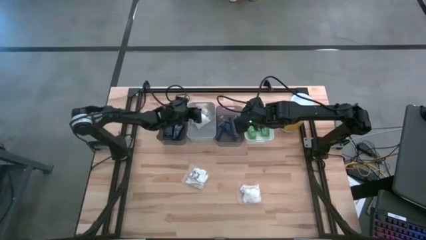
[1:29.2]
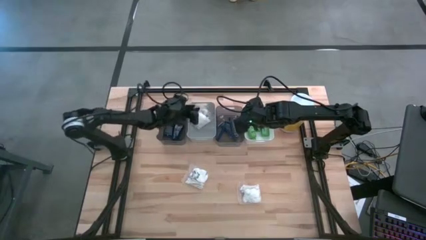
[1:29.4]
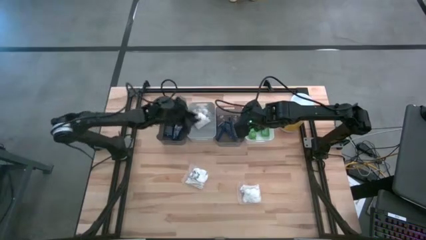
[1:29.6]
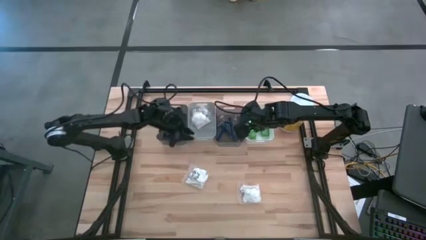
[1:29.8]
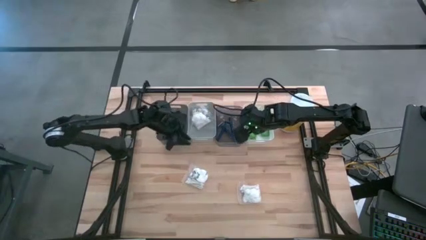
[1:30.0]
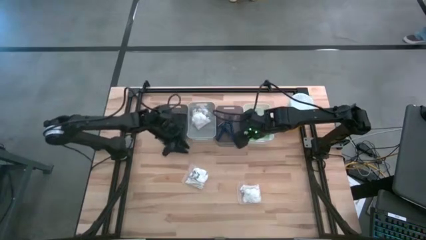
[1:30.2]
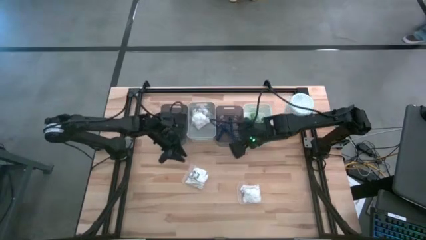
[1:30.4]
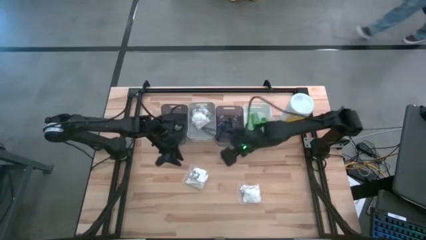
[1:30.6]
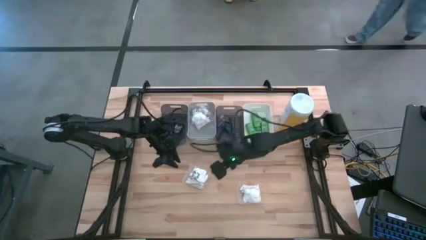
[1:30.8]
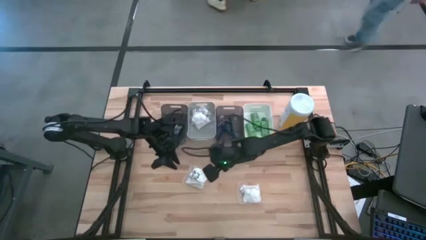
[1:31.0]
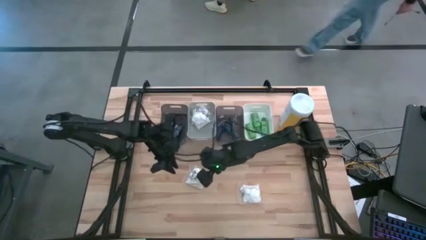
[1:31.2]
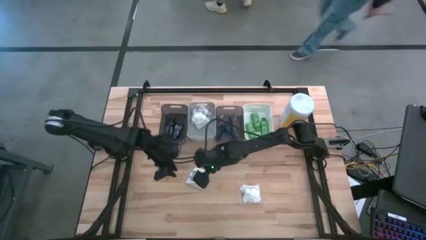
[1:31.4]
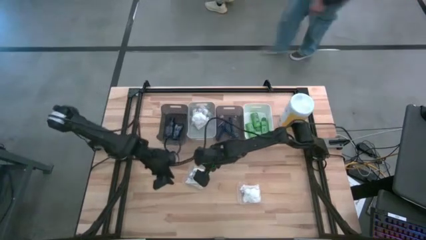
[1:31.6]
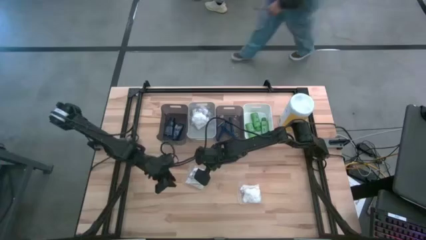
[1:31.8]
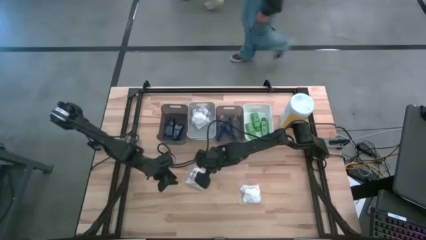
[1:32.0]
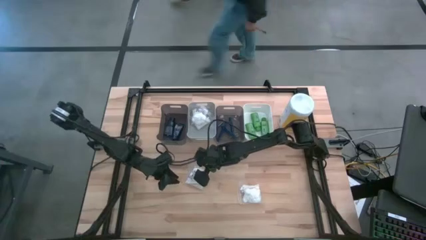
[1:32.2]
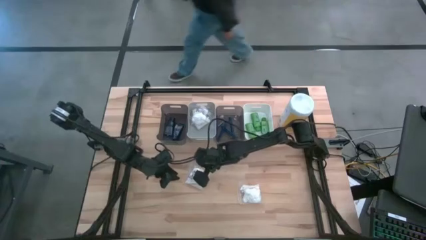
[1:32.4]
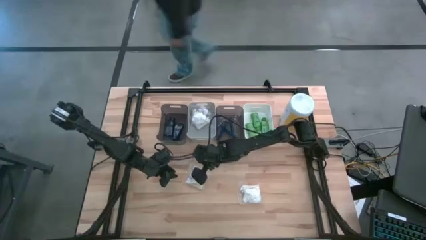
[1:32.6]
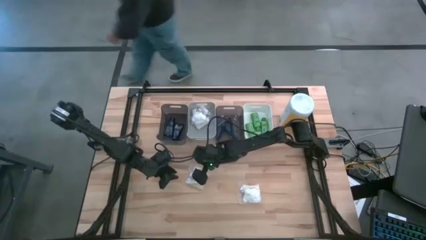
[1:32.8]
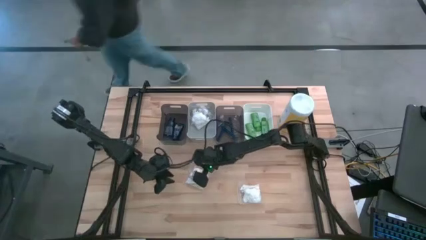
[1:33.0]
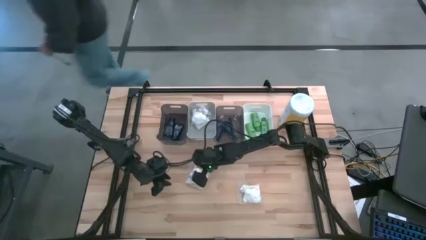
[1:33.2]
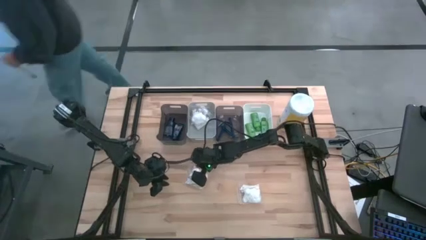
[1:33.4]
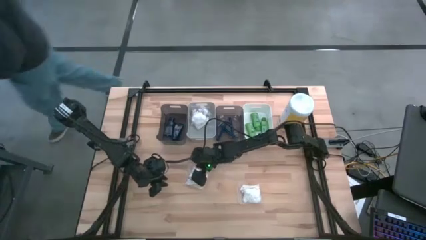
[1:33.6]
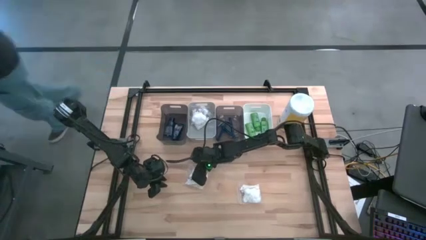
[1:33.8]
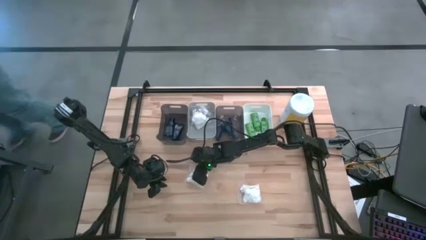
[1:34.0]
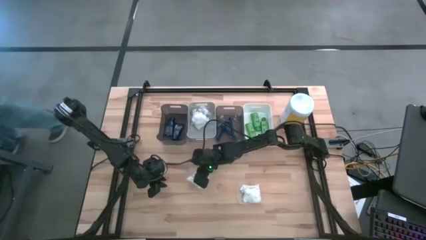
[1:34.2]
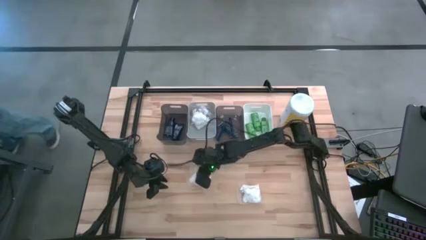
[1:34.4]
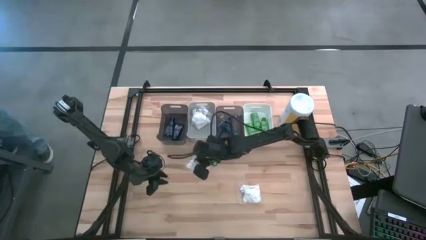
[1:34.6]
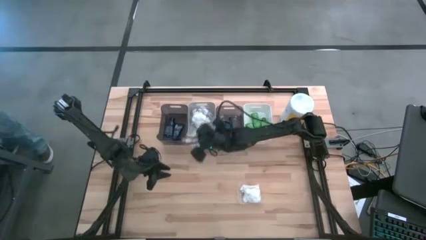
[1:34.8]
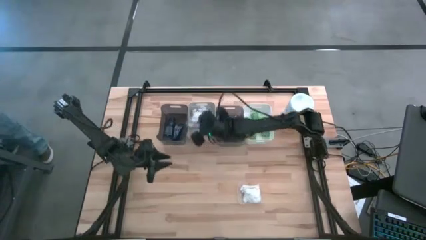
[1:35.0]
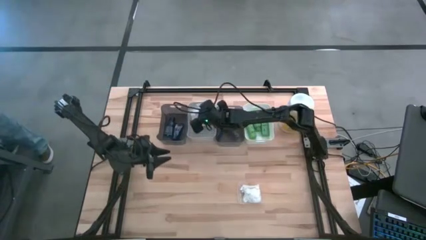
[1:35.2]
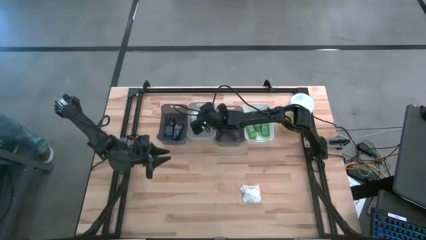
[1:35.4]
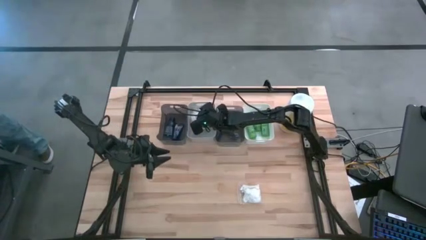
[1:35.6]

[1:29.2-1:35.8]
Task: Pick & Place Travel size toiletries
Put the white cotton pack into the gray bin

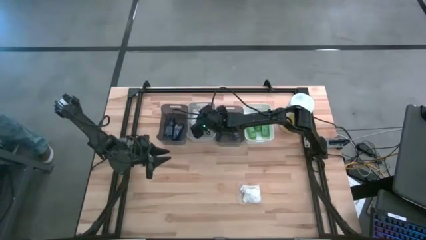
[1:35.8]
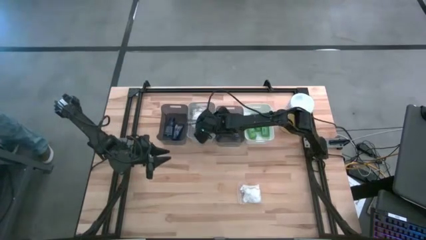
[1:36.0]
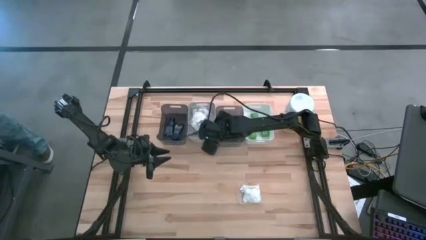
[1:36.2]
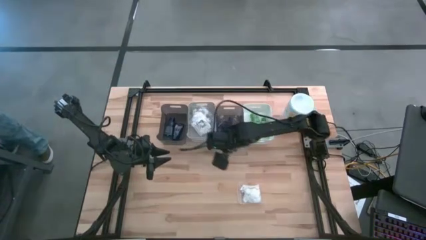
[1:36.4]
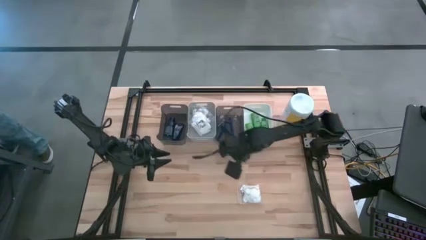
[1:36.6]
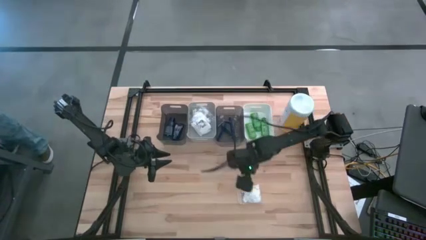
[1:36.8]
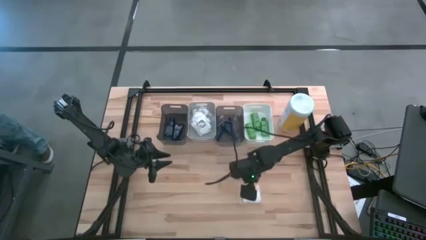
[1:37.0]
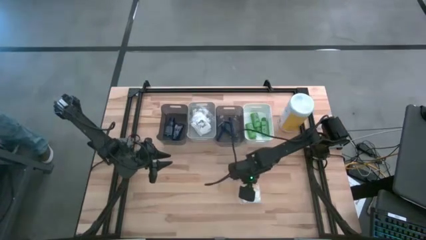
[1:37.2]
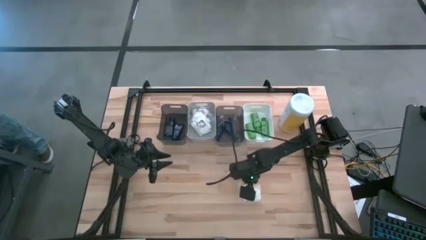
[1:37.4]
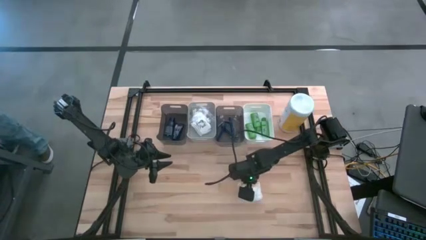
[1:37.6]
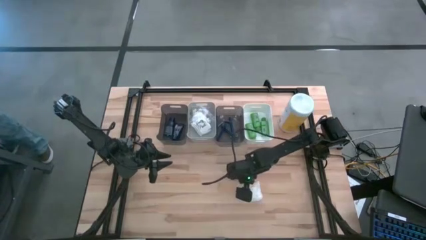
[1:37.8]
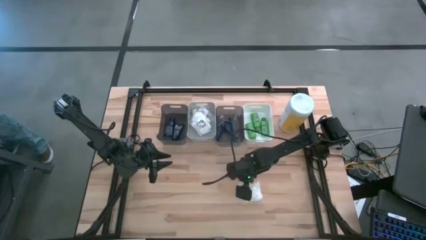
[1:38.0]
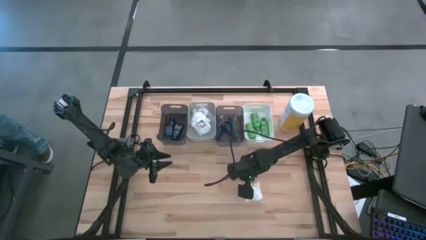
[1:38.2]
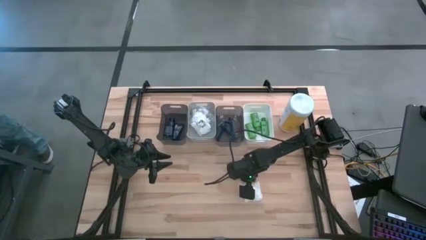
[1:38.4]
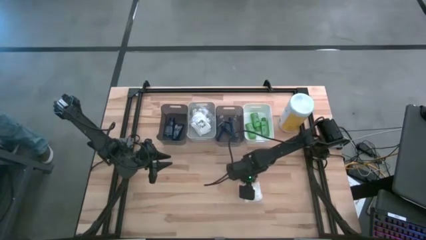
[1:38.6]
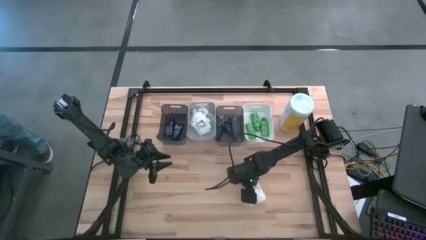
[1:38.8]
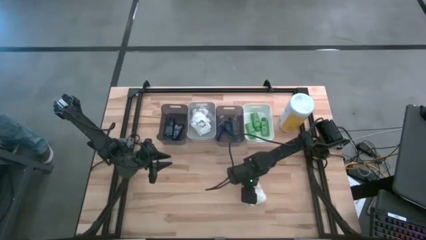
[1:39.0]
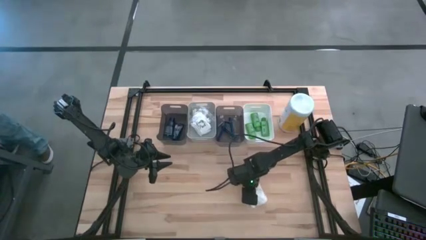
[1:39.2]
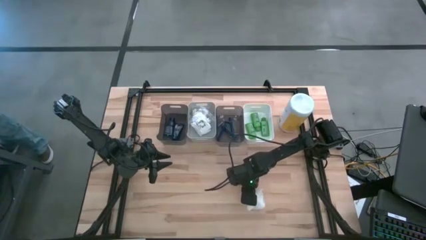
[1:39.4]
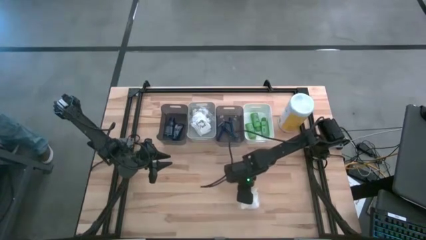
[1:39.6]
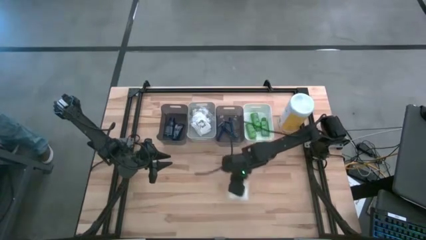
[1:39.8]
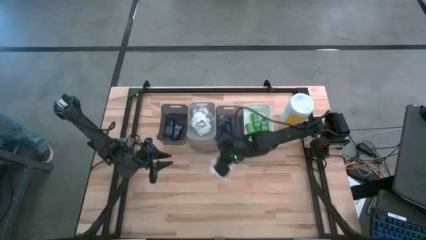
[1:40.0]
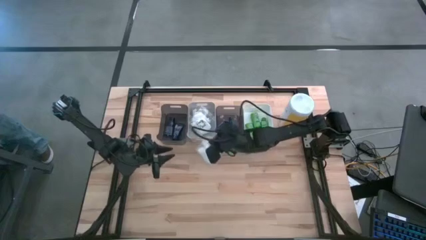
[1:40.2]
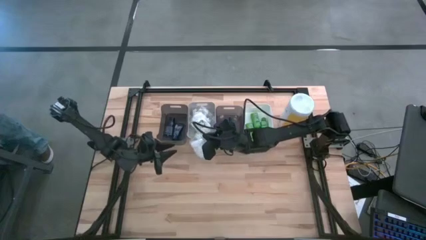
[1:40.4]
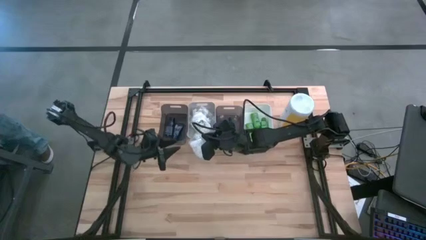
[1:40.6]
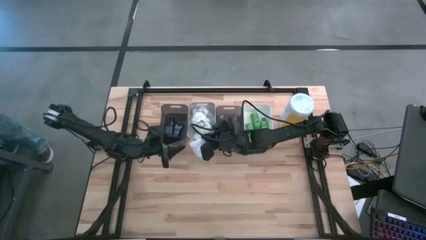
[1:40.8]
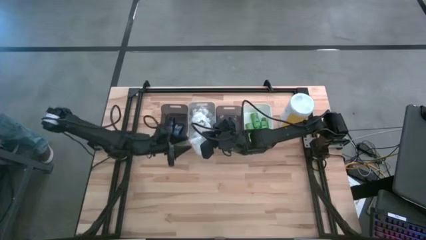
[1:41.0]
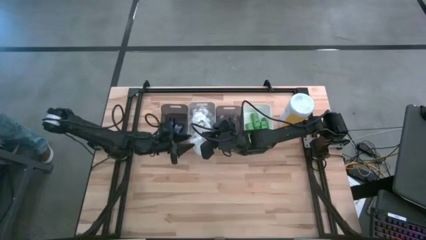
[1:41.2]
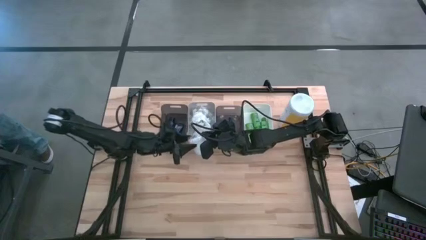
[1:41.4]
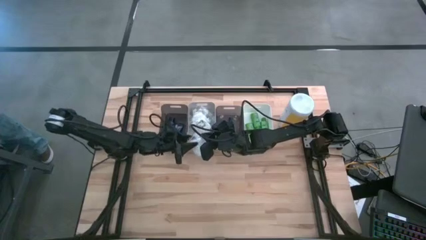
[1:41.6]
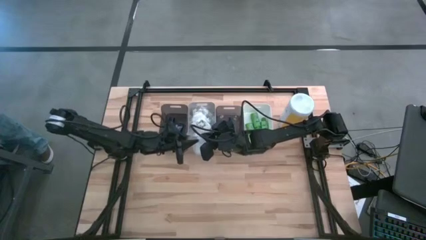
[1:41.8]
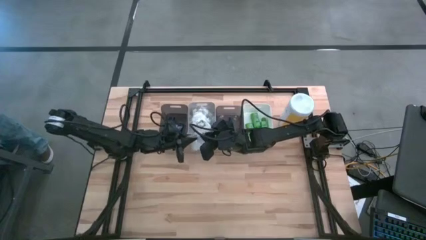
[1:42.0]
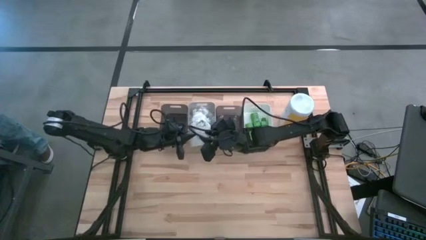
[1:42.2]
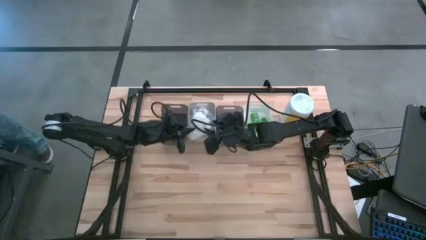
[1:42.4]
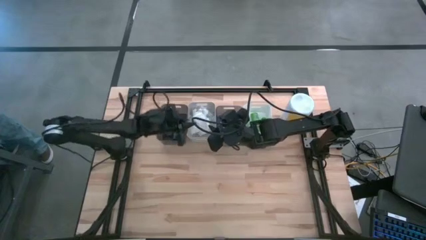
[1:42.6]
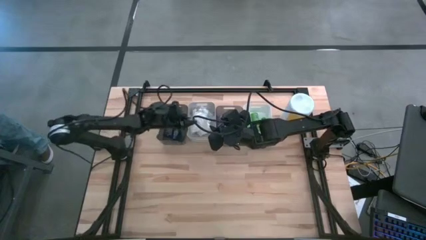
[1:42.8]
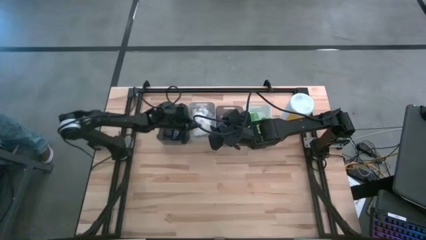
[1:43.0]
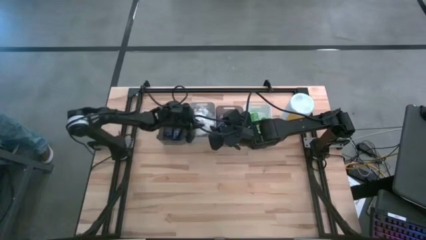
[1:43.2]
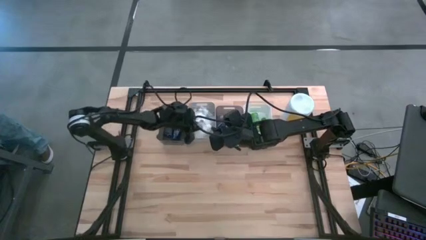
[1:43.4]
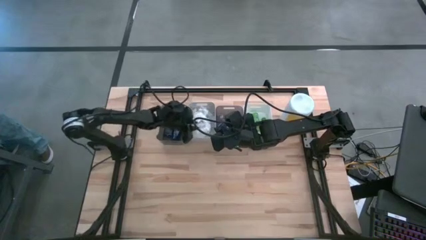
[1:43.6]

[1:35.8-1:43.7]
Put the white cotton pack into the gray bin

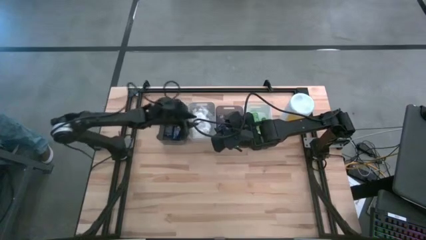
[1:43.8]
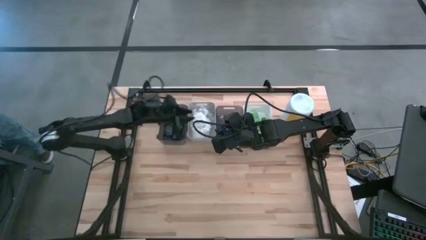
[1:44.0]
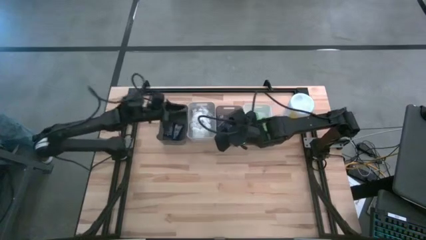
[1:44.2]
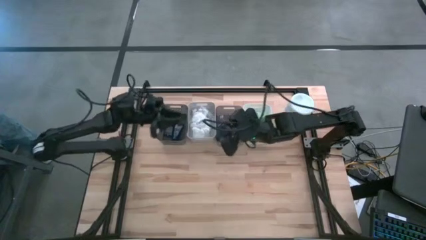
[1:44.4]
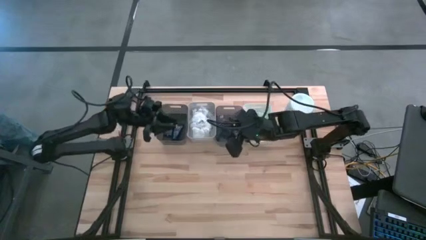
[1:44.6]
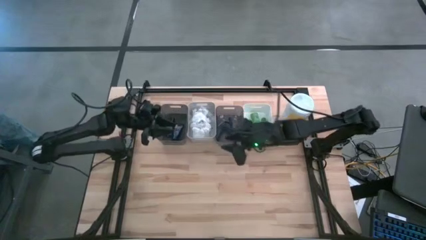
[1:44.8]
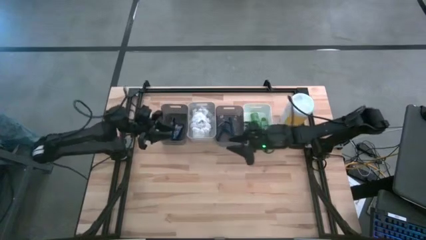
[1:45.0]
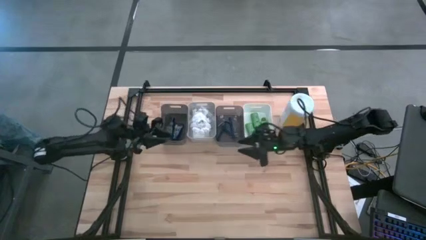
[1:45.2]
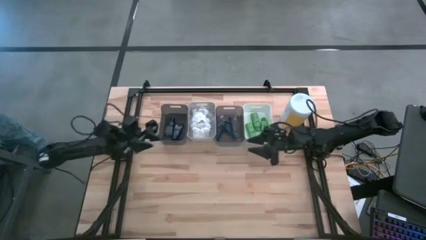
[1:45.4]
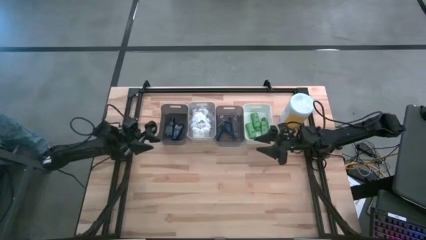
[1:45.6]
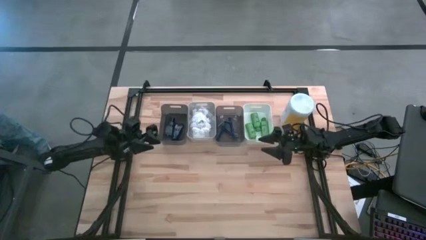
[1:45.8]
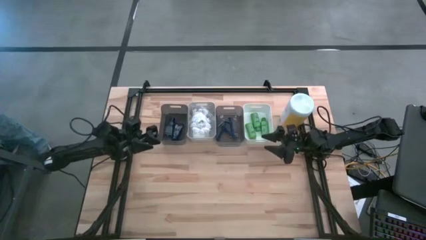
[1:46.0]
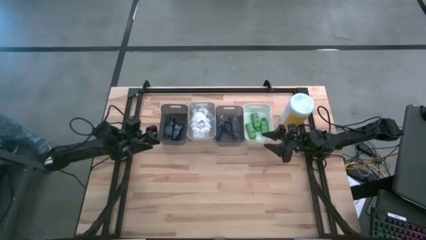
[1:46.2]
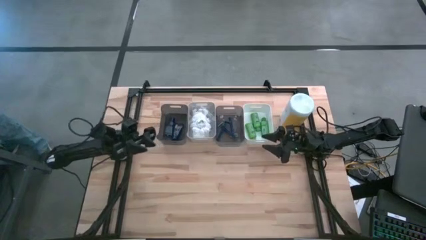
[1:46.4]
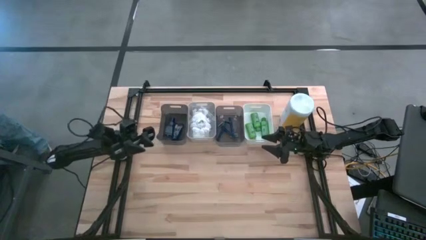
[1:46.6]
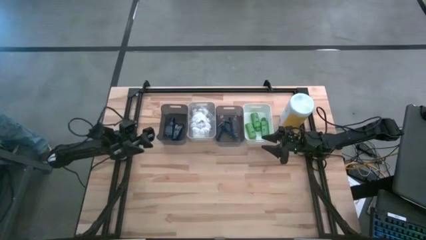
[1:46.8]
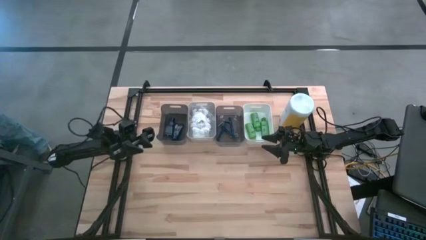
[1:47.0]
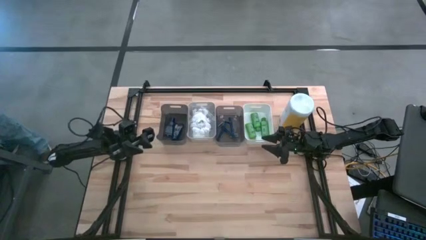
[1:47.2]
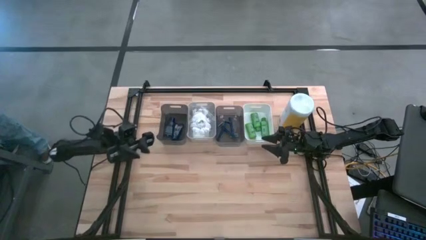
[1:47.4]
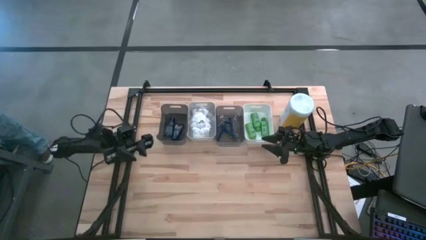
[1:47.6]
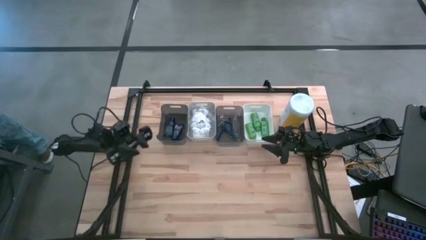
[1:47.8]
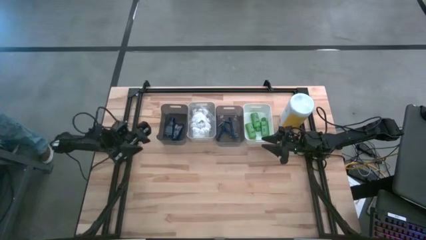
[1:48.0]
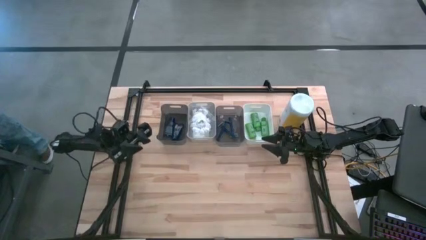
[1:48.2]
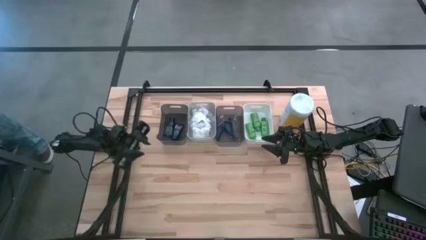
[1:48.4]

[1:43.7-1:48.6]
Return to Home Position
